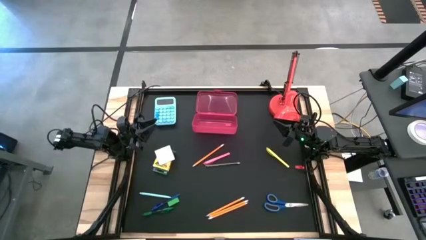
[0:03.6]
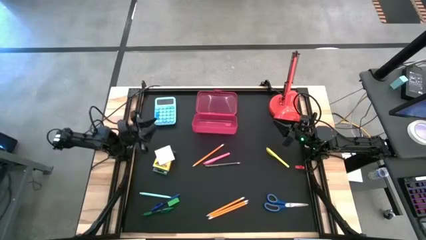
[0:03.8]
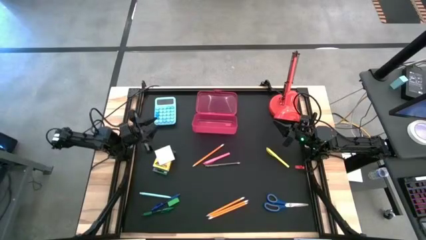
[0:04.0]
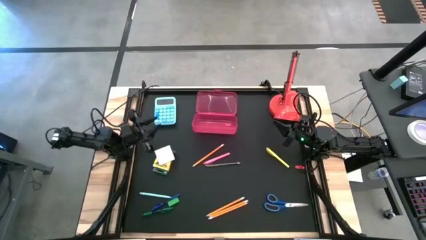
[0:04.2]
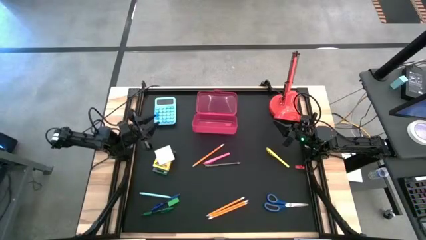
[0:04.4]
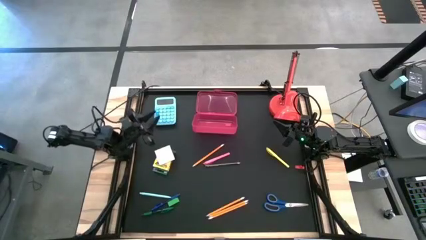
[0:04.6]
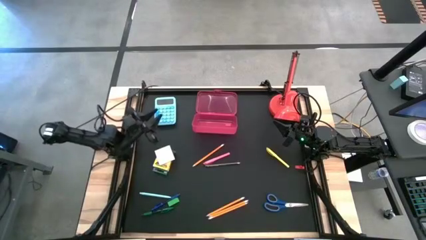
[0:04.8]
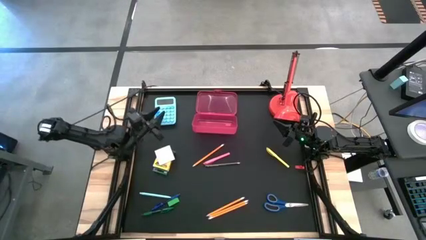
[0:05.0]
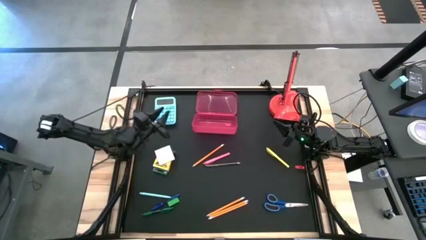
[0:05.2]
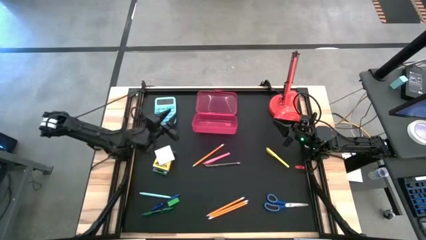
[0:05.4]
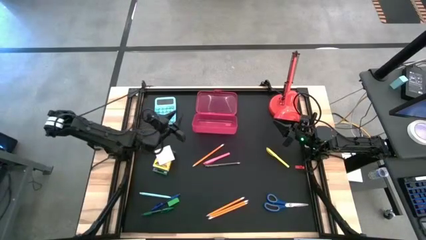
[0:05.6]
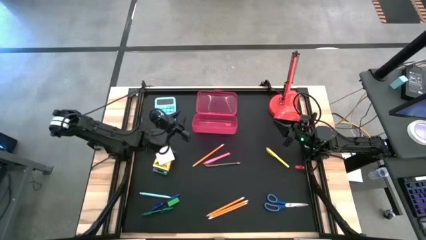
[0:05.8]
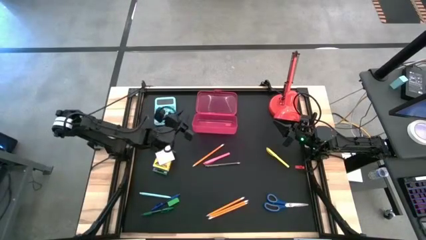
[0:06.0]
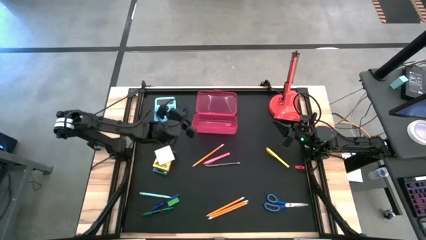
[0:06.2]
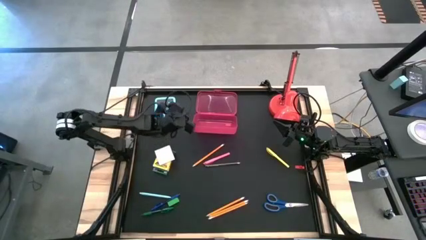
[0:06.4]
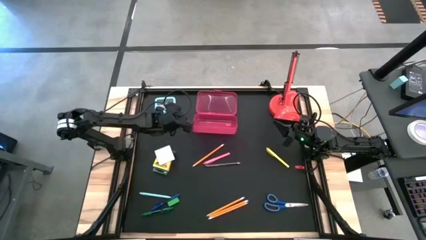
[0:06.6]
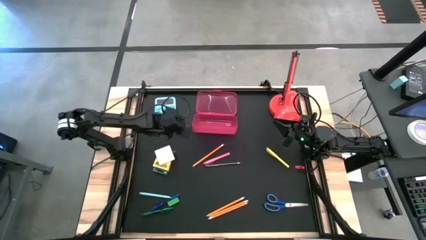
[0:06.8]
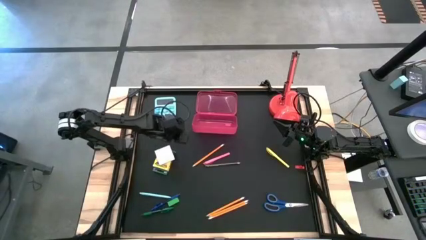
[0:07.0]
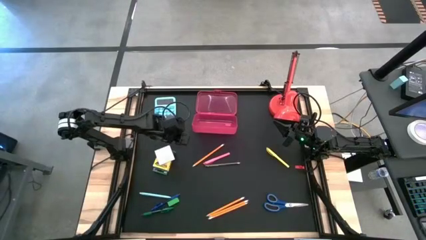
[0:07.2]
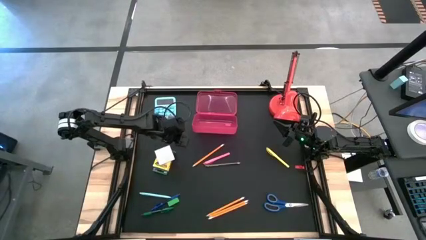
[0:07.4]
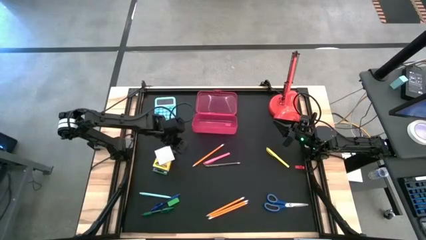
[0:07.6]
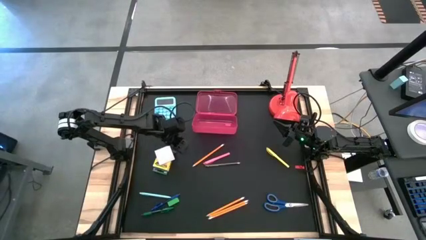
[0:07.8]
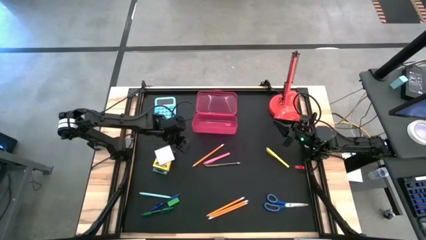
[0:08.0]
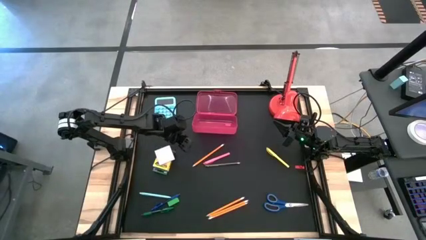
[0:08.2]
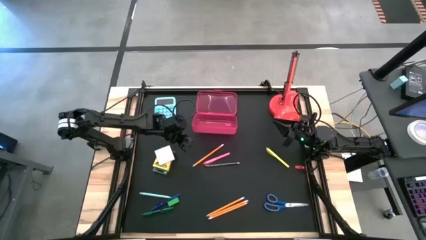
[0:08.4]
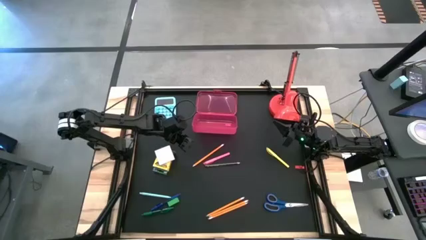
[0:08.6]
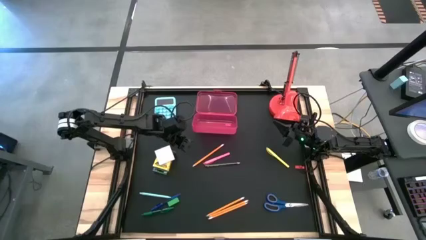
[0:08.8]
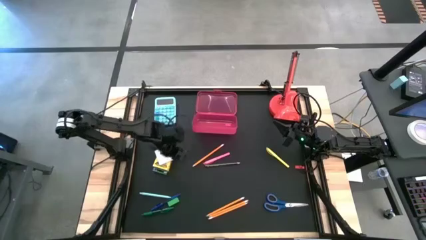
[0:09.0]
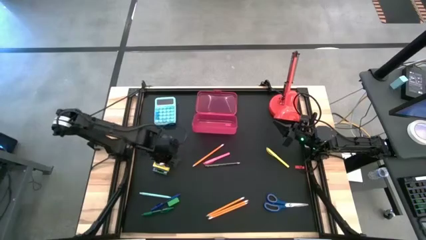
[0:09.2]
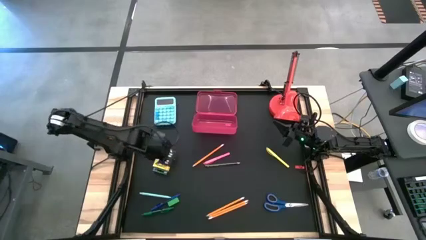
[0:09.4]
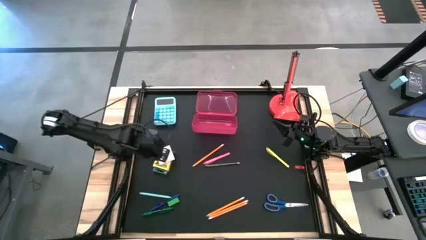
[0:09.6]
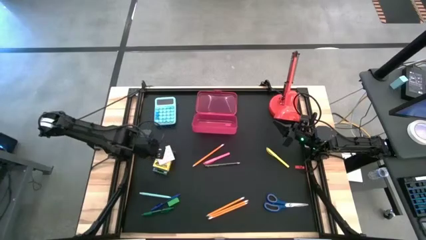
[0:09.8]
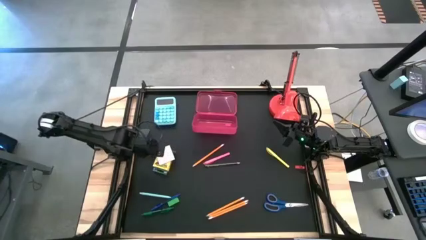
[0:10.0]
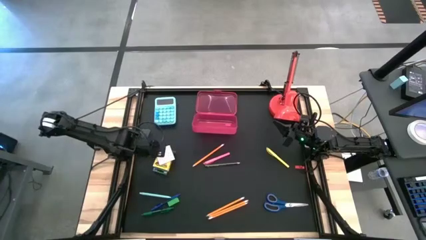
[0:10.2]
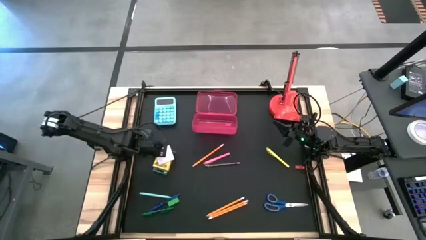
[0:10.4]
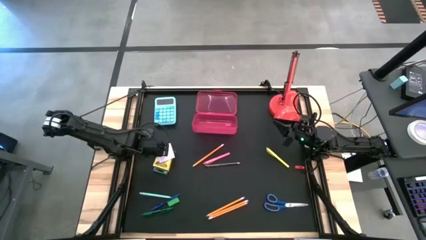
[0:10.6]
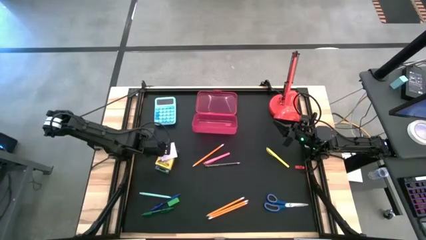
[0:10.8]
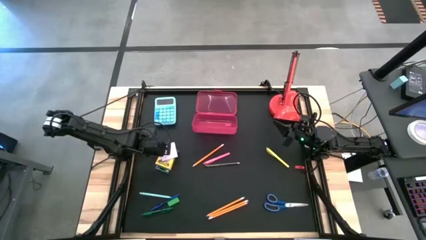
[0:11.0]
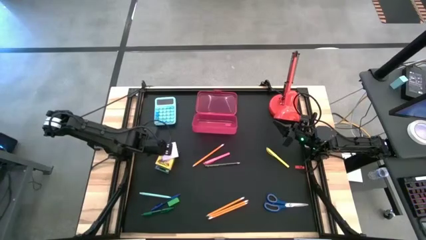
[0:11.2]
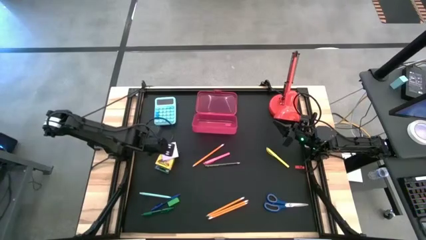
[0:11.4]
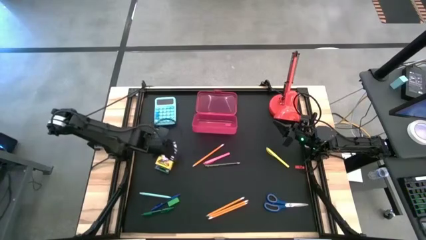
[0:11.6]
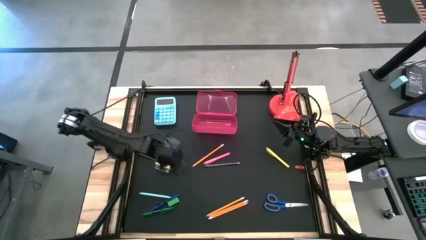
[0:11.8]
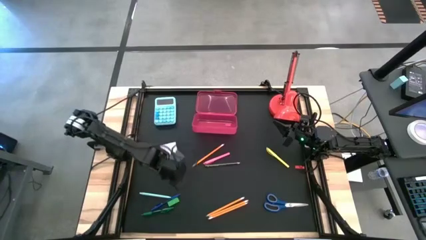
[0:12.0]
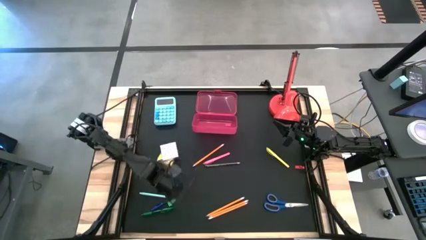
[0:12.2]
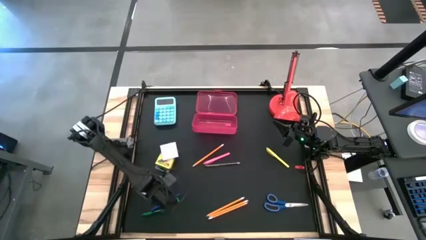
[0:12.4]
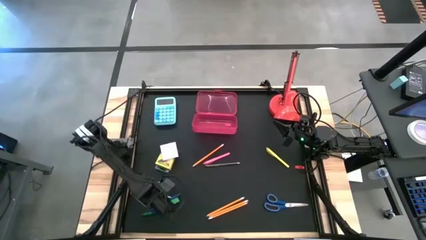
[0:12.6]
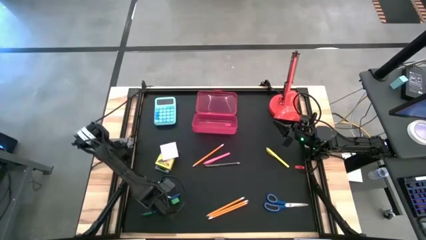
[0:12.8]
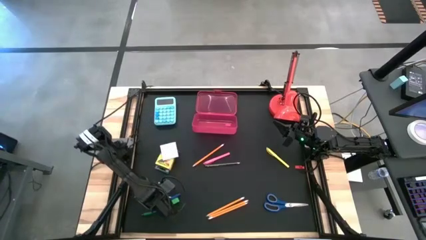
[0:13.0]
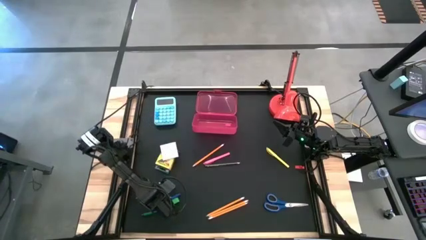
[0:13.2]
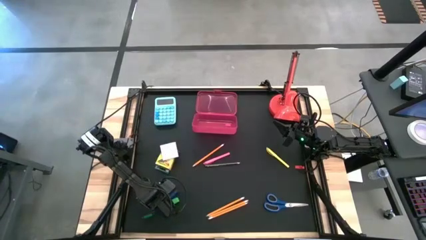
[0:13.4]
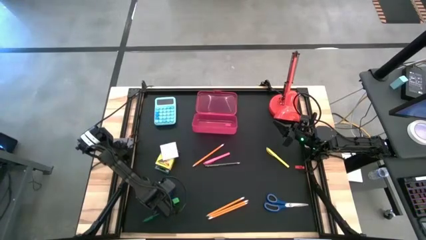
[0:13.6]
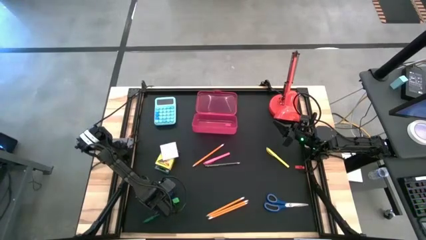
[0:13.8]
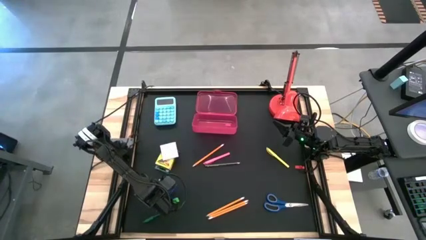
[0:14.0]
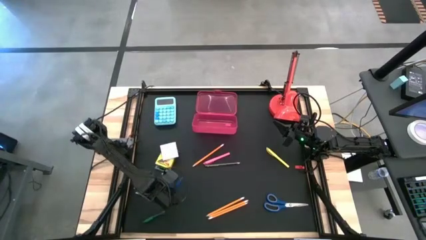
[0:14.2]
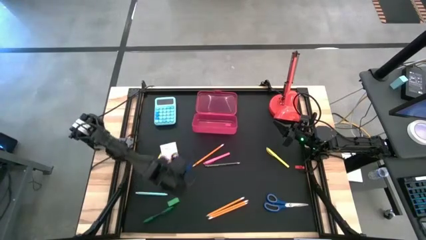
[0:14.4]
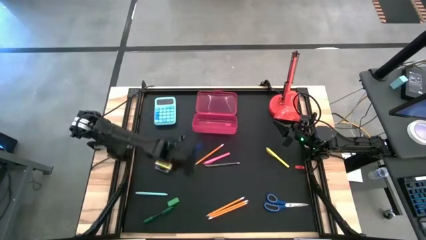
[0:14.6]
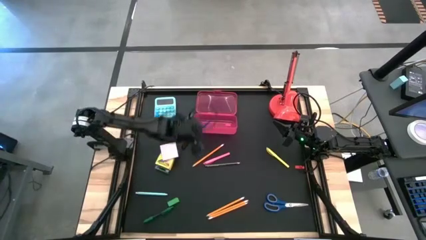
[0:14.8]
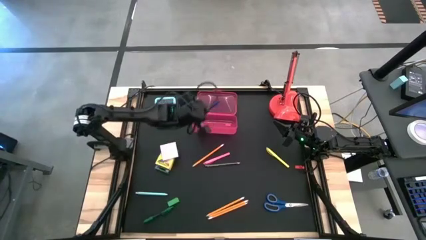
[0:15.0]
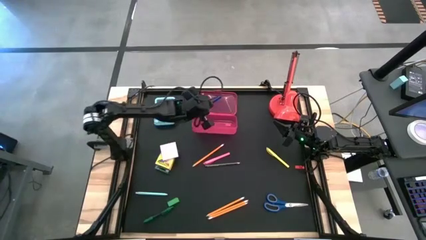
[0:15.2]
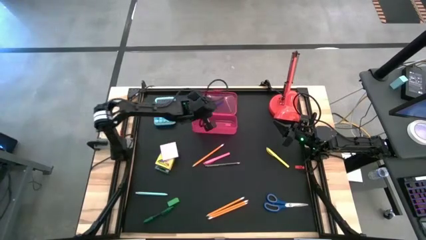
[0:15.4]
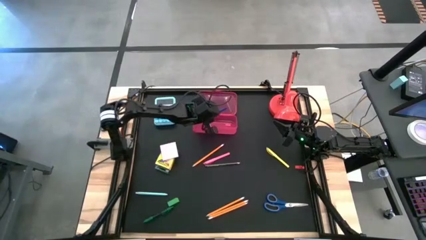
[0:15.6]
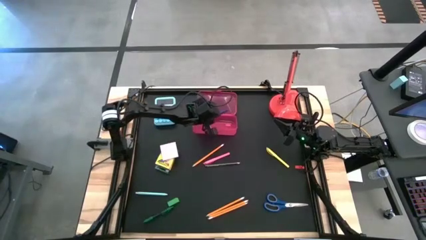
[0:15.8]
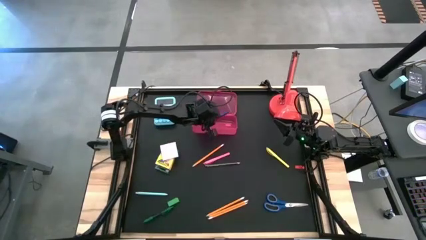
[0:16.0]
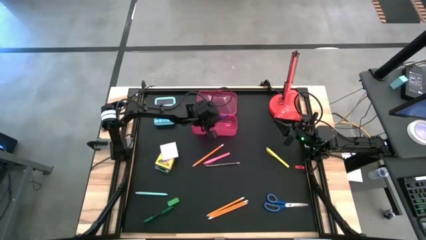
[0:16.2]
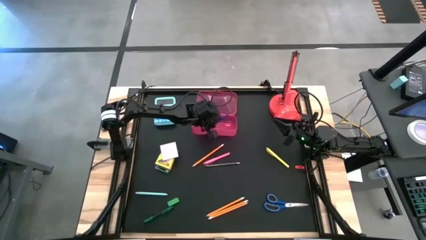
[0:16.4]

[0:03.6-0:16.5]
Task: Pack school essentials
Put the blue pen into the pink supply box

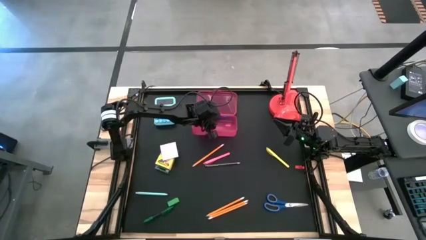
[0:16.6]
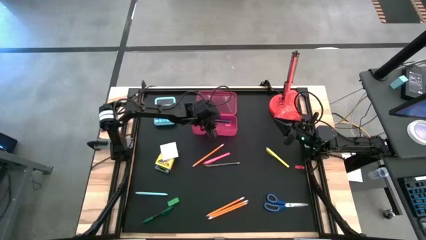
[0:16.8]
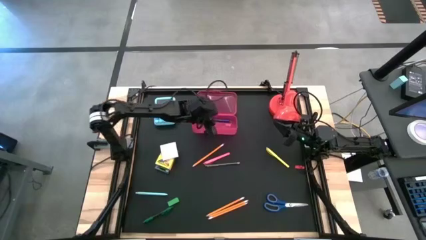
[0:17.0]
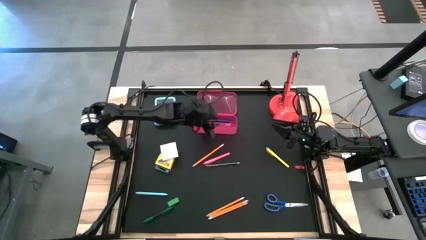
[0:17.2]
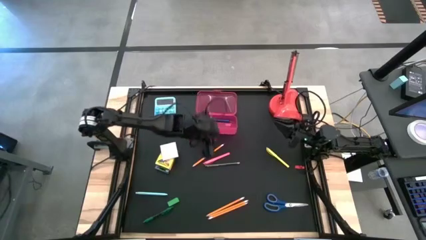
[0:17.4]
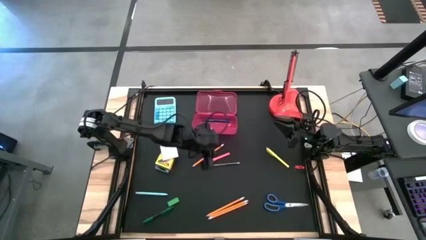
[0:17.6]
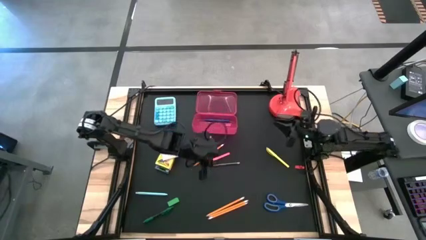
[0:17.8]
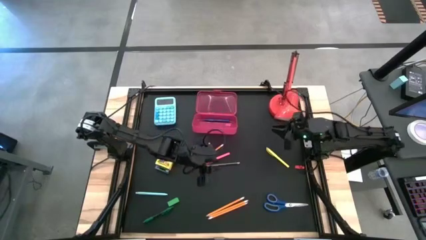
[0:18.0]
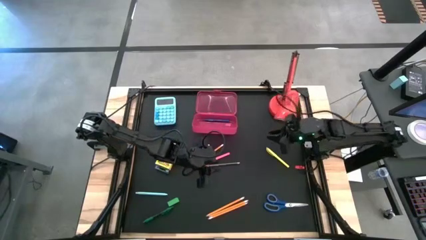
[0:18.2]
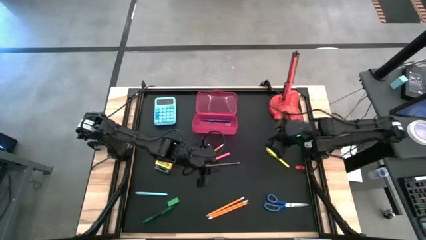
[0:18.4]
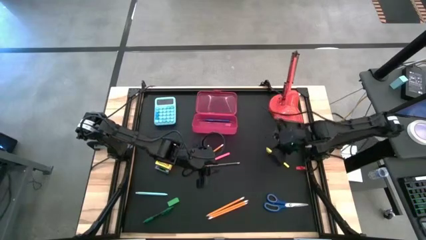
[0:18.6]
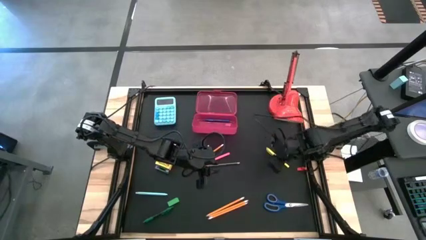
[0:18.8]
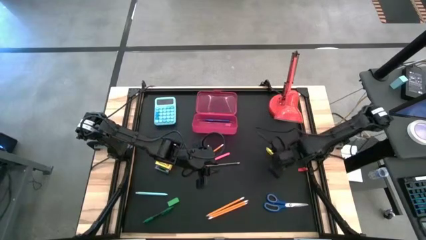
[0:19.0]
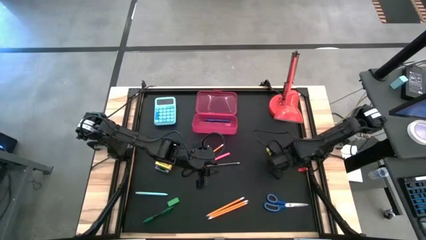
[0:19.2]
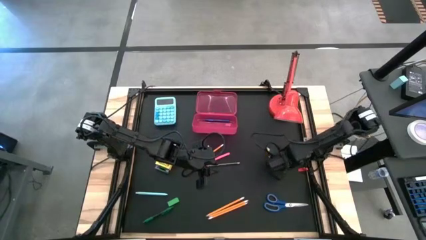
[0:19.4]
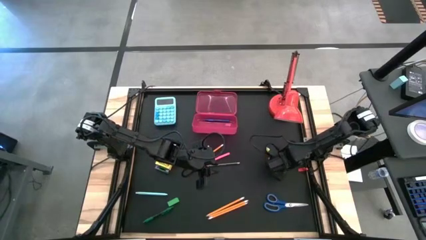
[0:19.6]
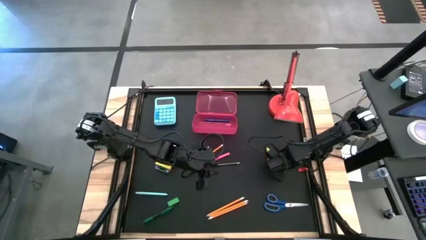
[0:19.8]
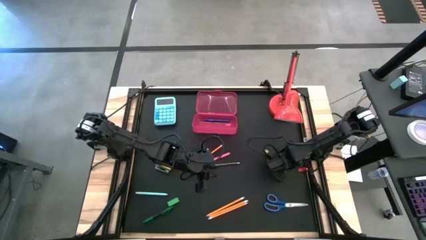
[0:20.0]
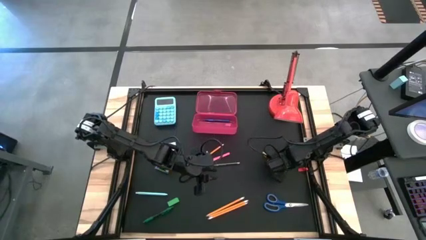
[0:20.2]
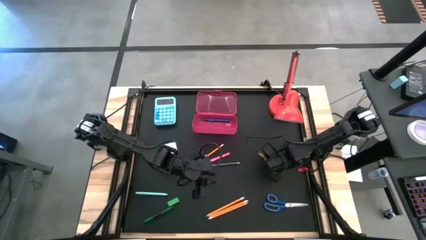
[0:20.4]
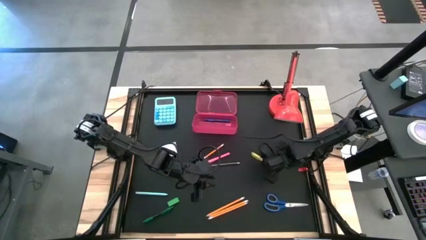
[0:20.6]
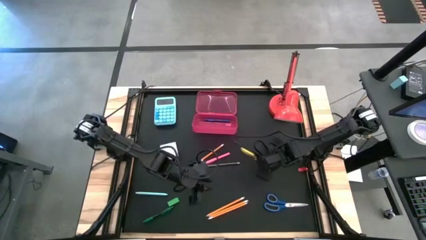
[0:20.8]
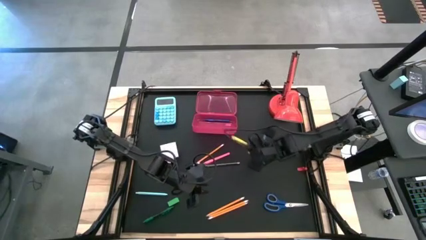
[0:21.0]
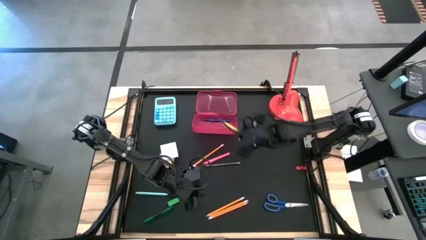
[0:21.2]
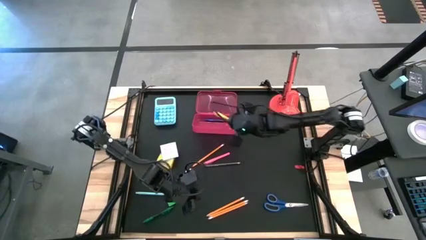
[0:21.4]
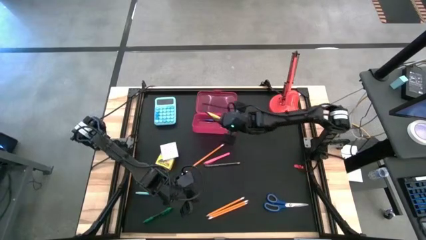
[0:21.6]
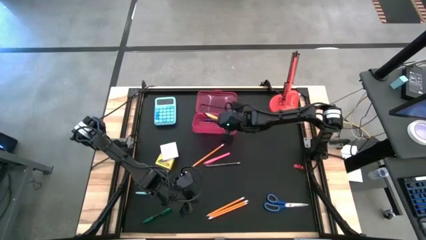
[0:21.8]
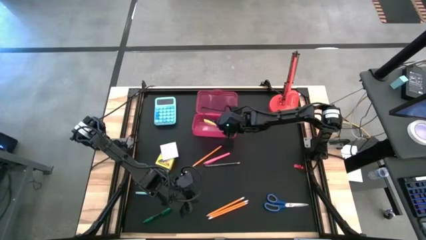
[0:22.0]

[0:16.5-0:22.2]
Put the yellow pen into the pink supply box
